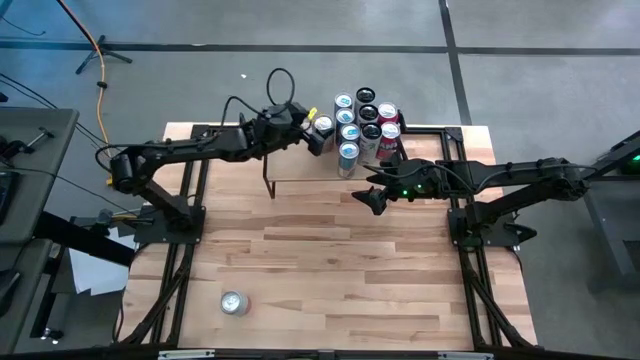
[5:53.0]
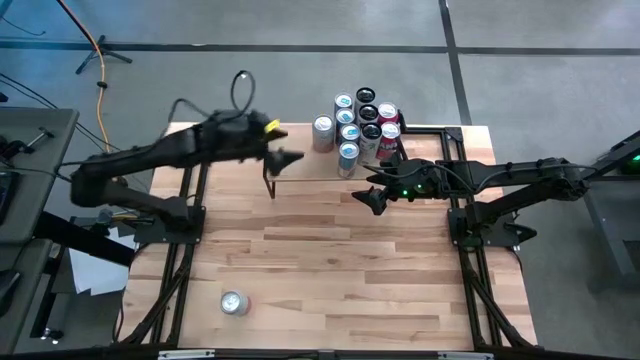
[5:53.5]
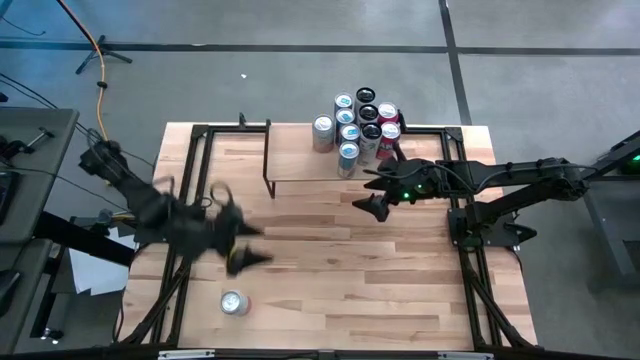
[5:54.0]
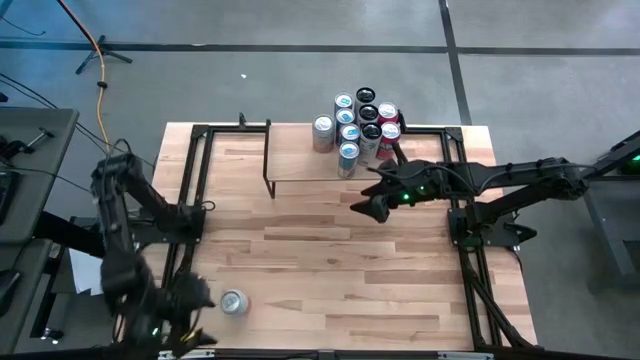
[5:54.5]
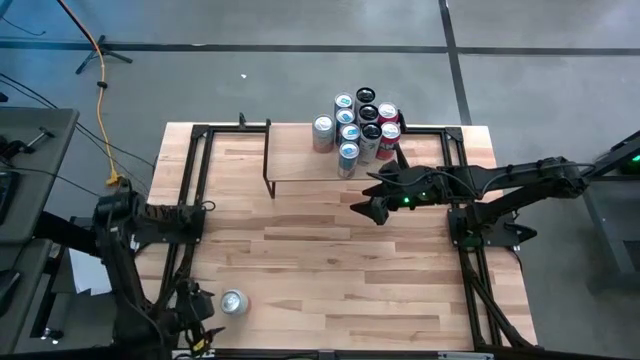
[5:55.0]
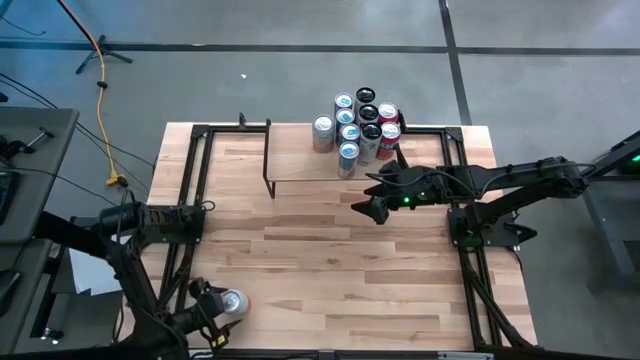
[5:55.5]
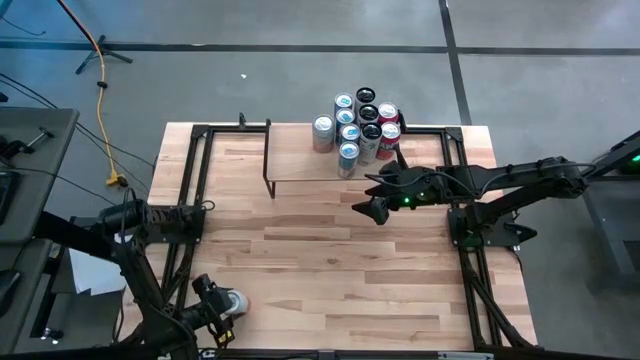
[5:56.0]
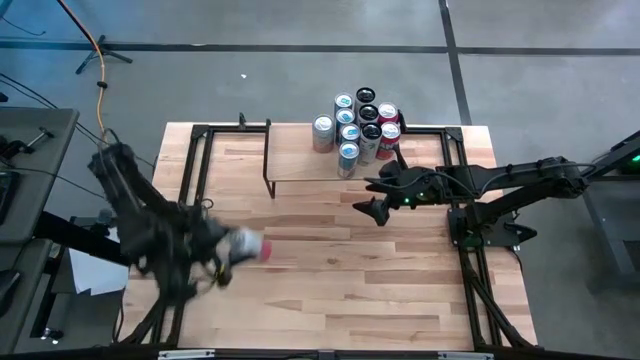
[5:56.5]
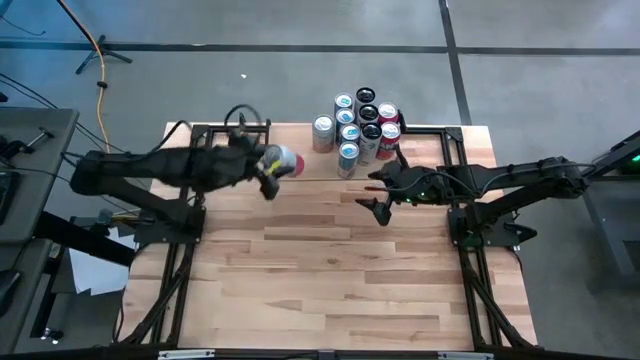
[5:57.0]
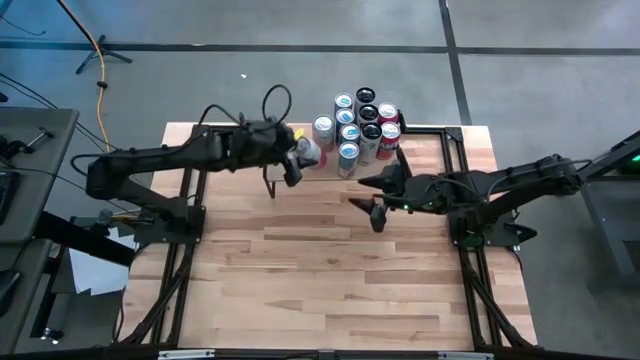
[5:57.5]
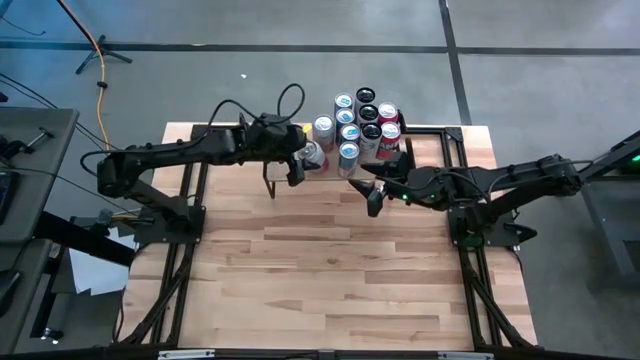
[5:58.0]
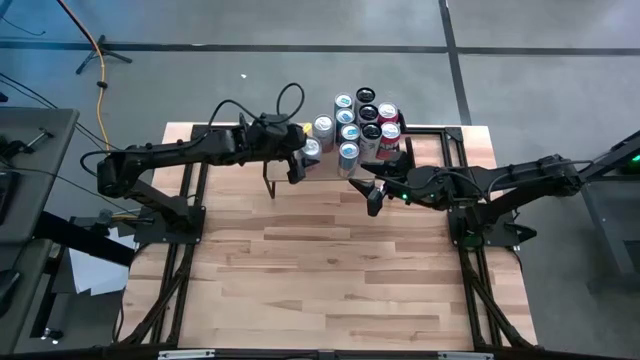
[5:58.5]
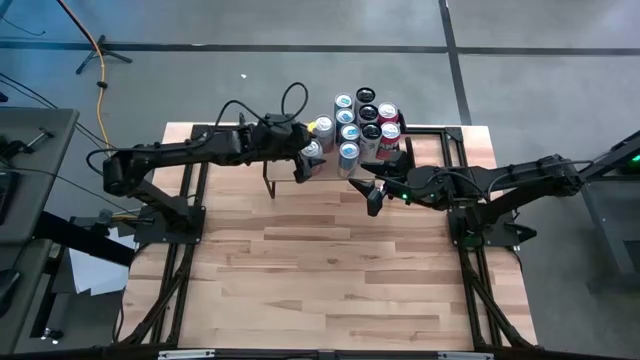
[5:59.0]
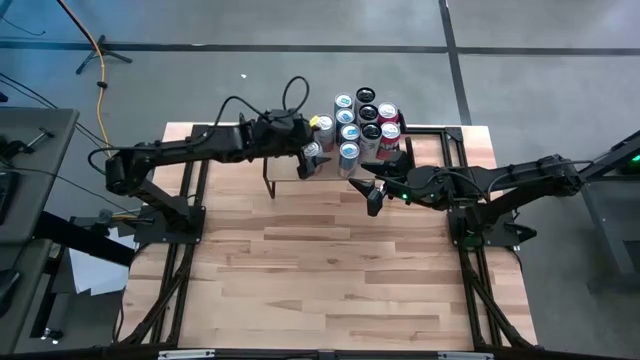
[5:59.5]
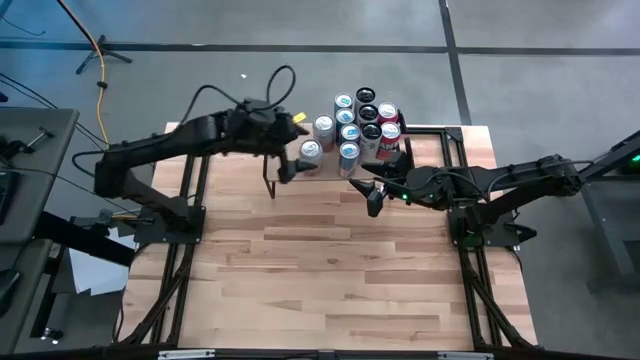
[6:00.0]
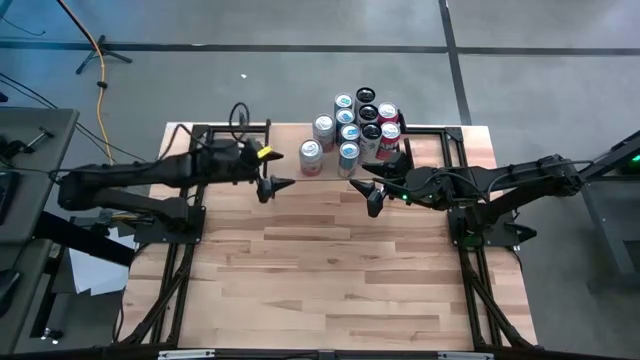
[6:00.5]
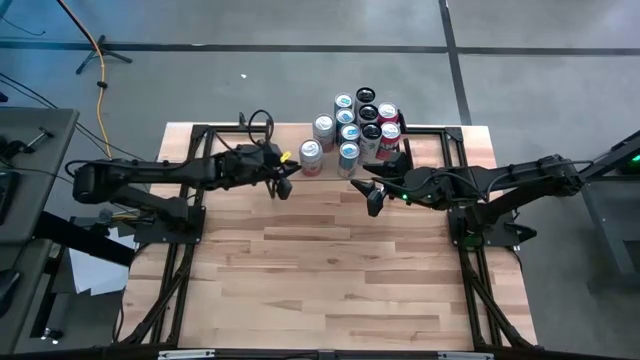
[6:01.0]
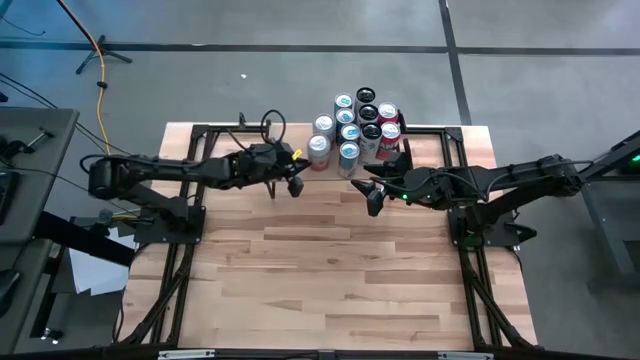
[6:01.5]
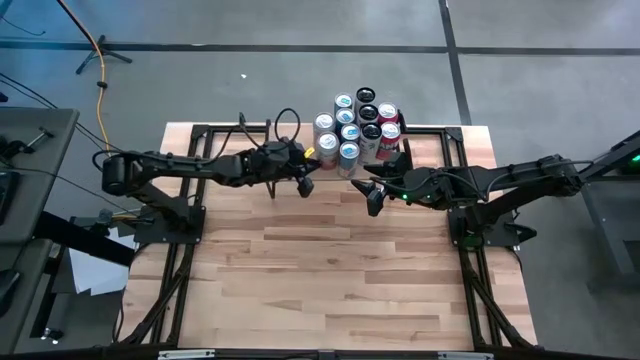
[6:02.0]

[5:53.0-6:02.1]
Task: Place canned beverage on shelf
Put the pink-white red soda can on the shelf aligned with the orange soda can

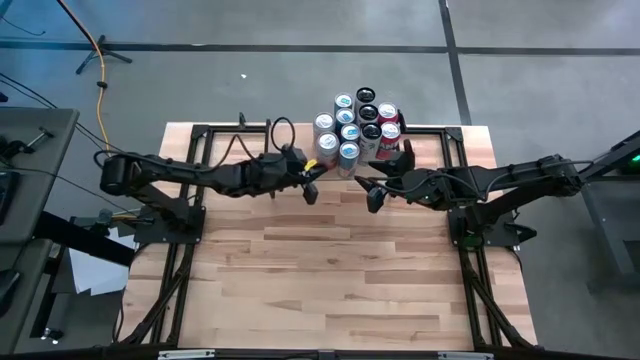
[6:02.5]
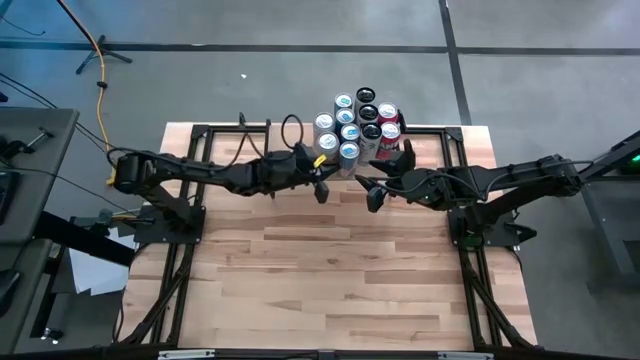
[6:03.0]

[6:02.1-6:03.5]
Adjust the blue soda can on the shelf

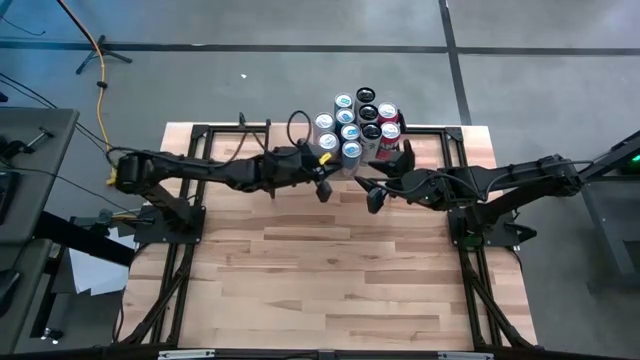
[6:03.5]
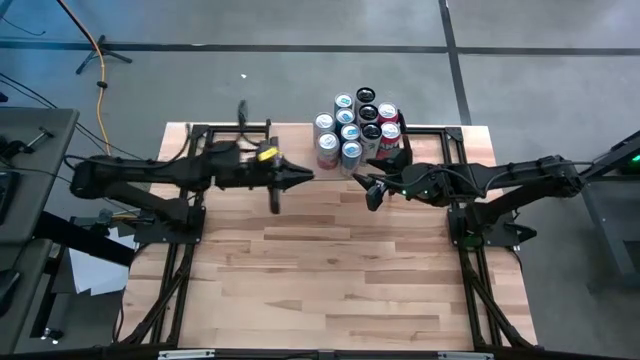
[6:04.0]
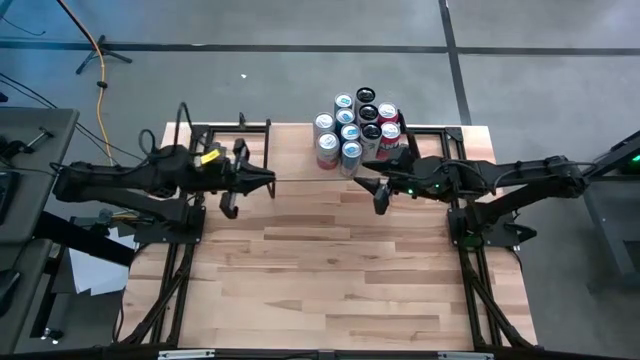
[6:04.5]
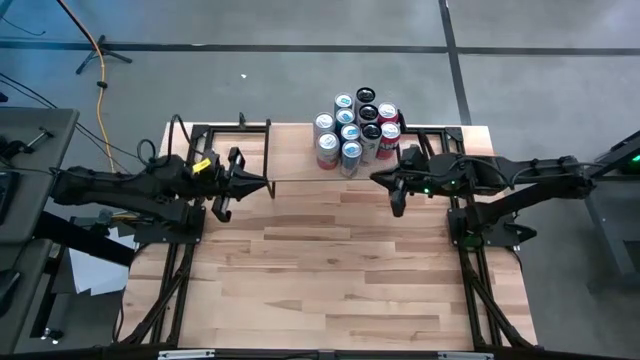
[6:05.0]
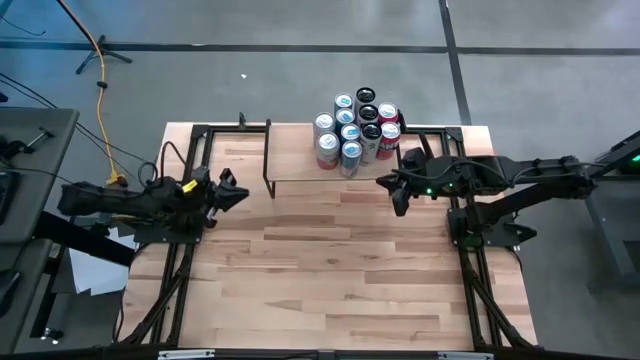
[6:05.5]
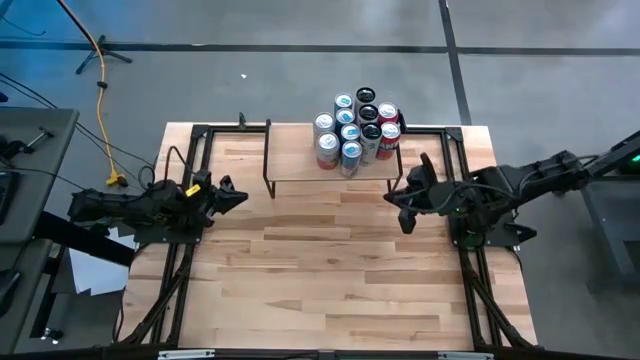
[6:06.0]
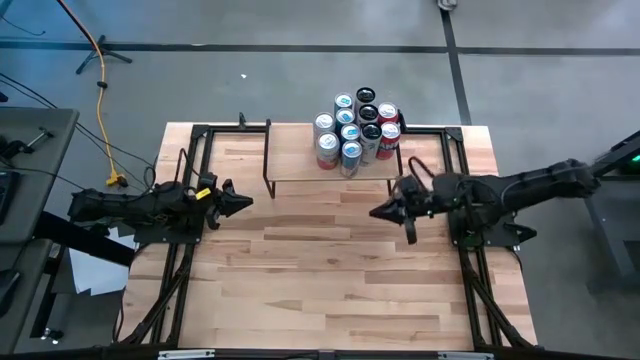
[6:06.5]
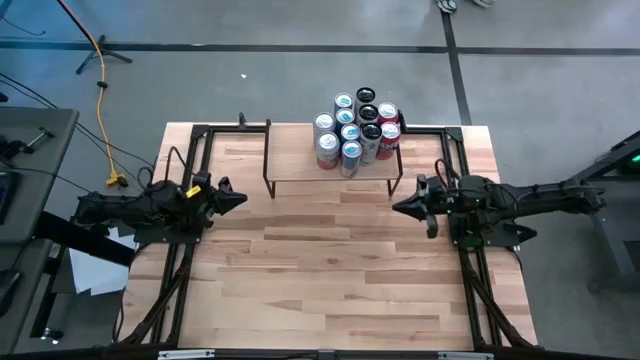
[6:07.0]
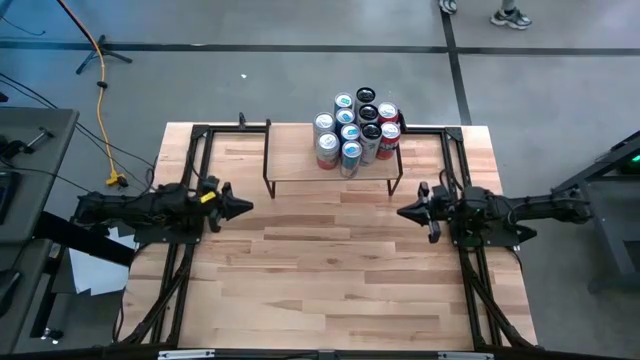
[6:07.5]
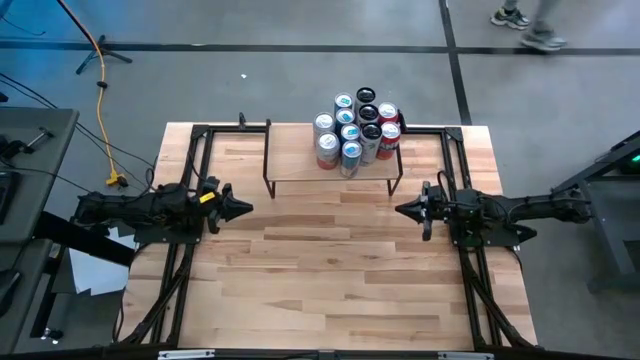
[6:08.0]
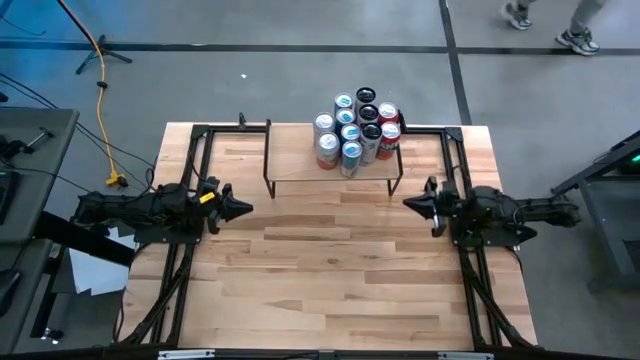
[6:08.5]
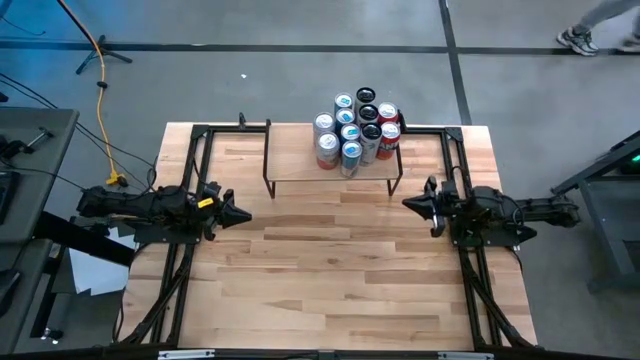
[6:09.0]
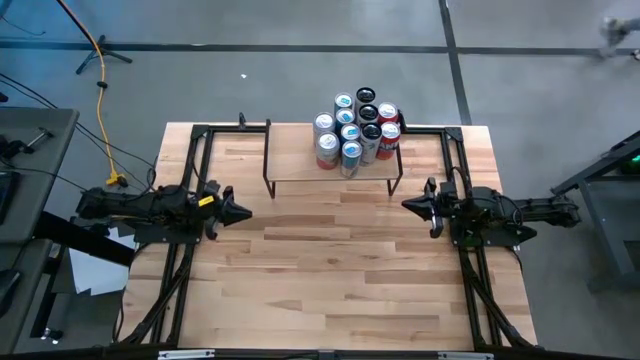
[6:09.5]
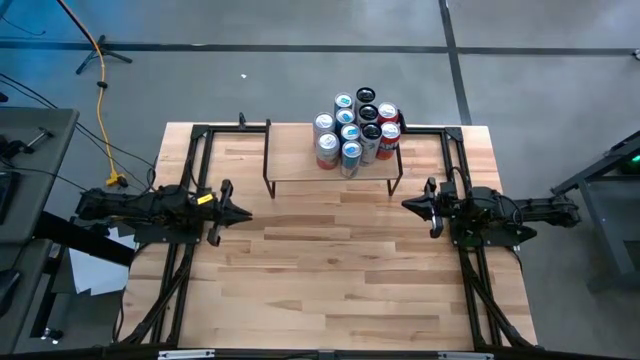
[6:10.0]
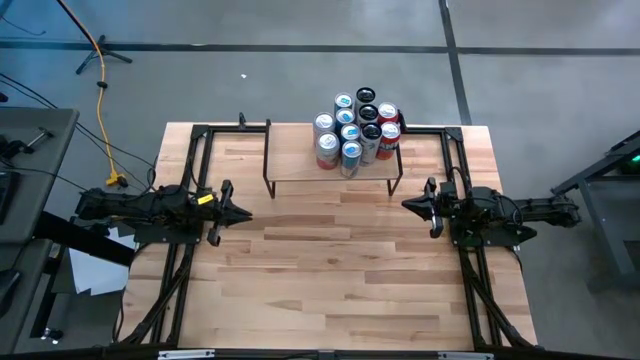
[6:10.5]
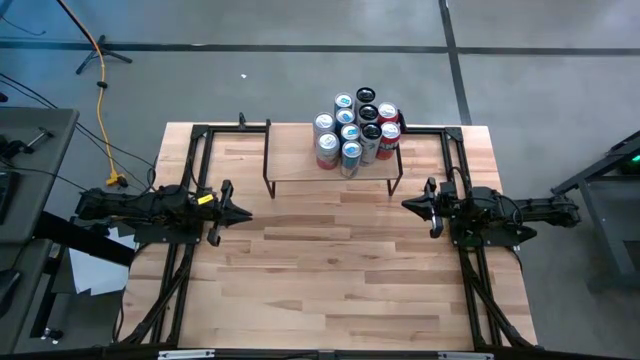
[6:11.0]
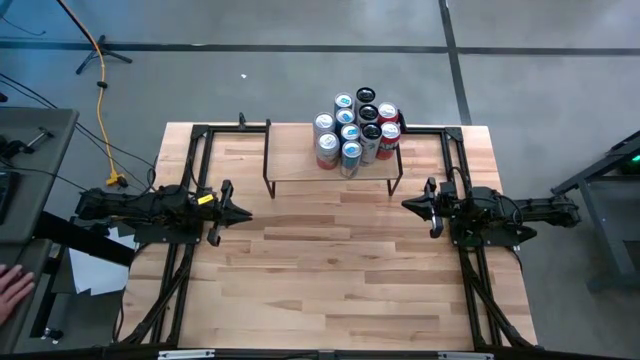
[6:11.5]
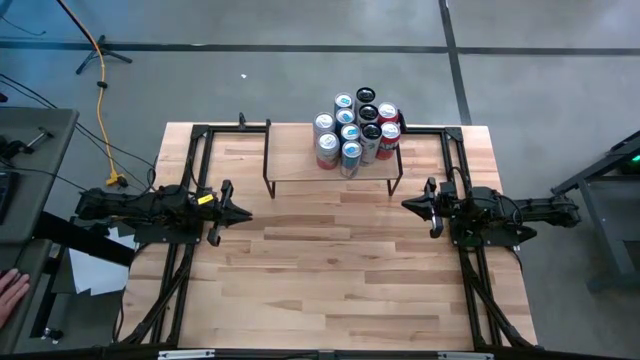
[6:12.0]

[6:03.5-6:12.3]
Return to Home Position

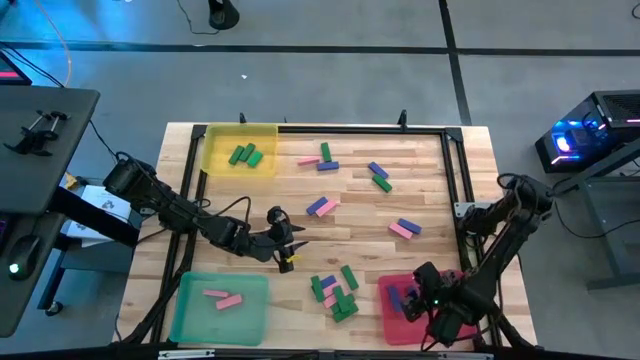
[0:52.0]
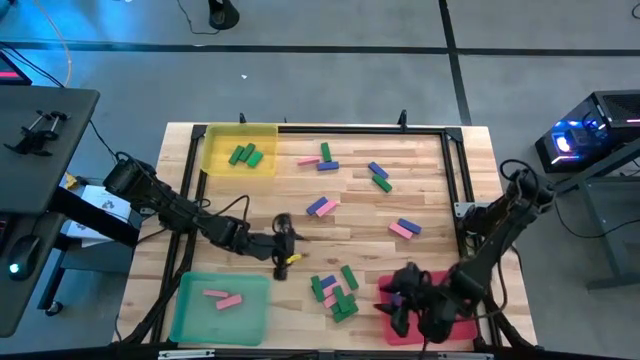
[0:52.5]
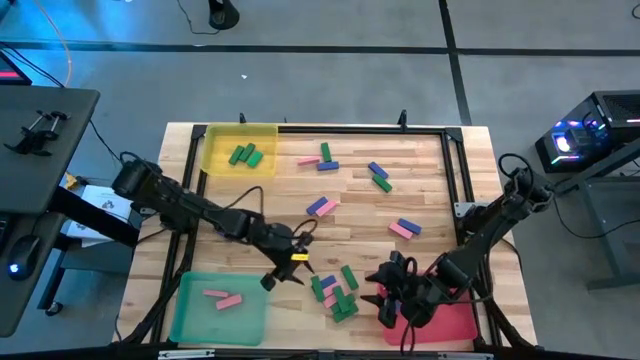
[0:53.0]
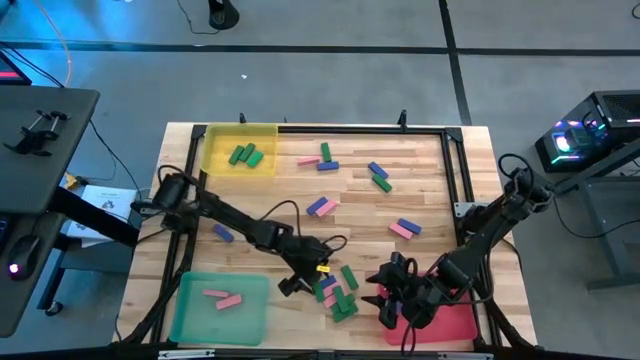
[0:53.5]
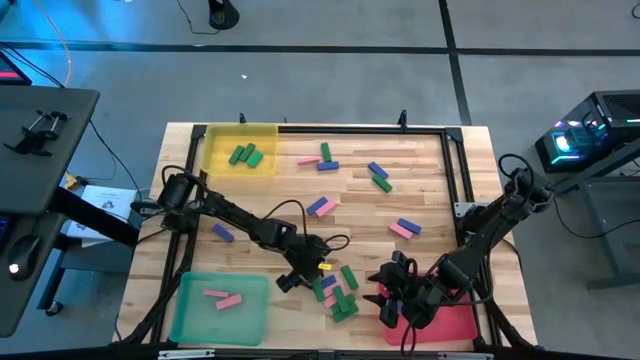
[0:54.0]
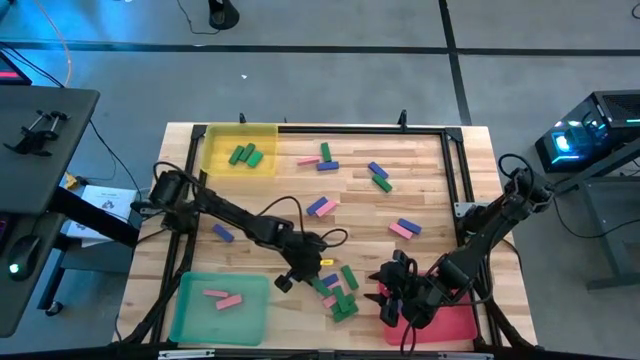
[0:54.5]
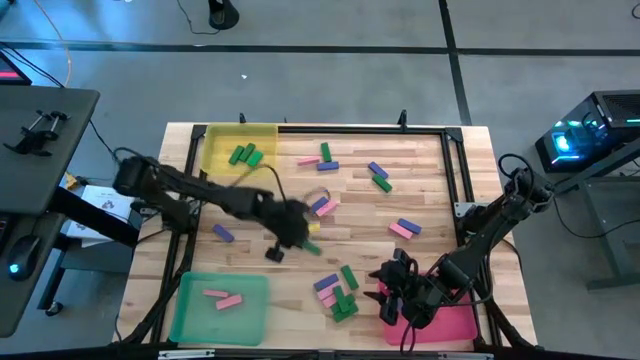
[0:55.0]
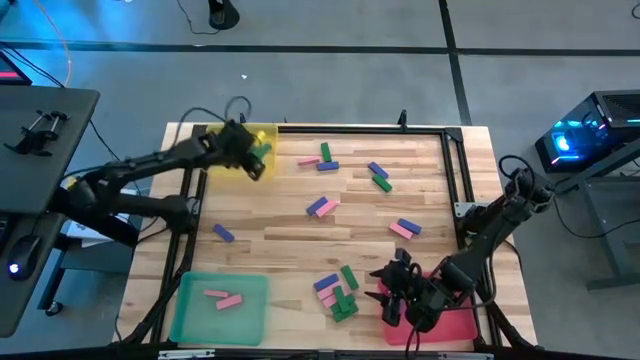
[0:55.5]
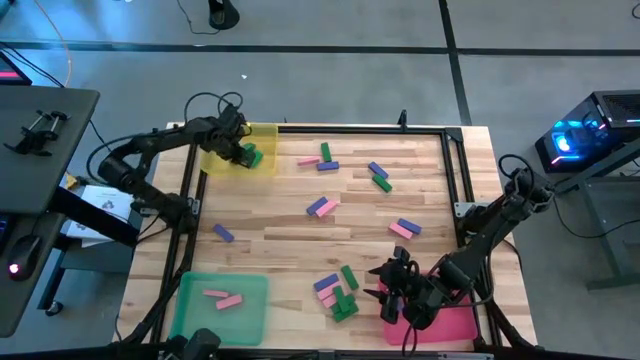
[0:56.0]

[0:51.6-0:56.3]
Task: Sort blocks
Put the green block into the yellow bin
